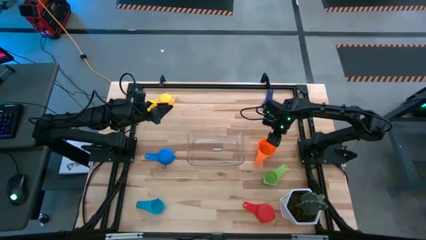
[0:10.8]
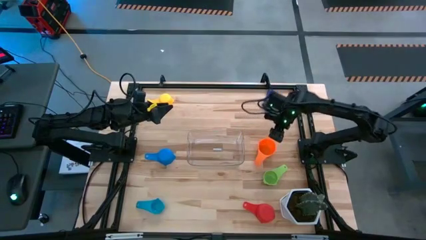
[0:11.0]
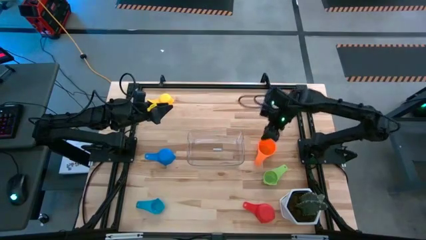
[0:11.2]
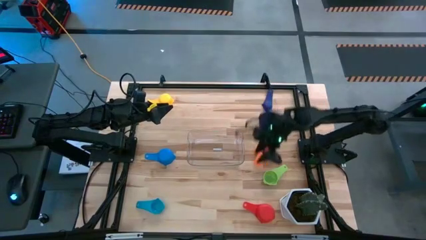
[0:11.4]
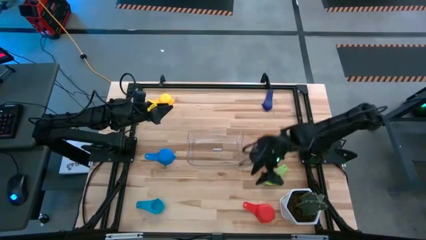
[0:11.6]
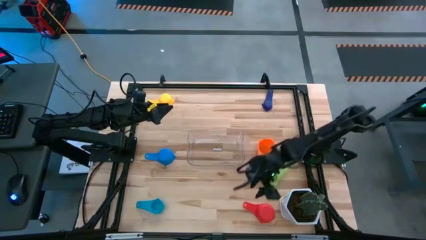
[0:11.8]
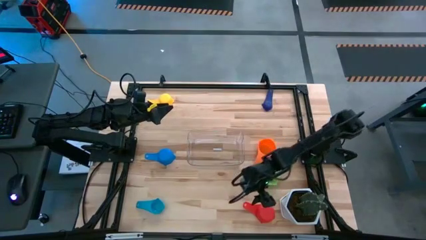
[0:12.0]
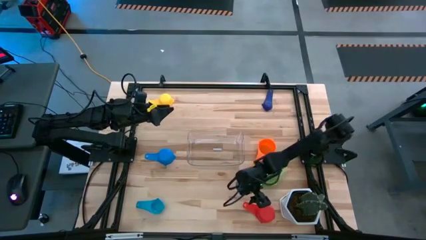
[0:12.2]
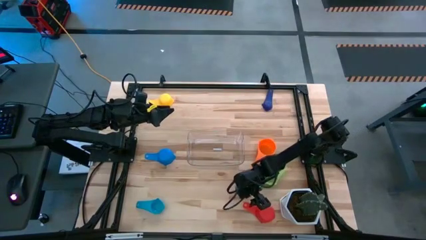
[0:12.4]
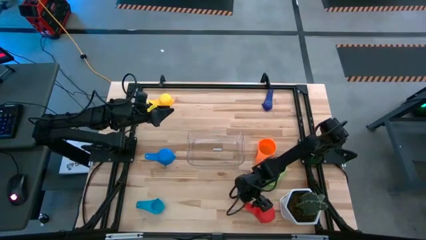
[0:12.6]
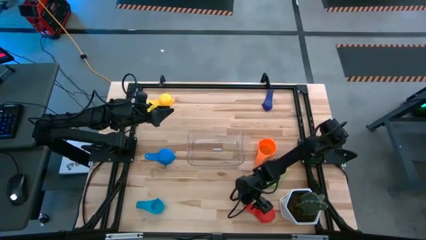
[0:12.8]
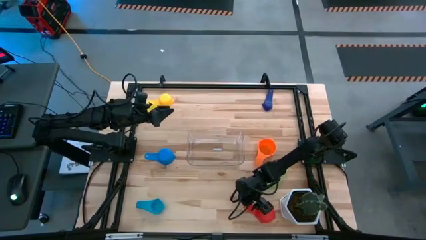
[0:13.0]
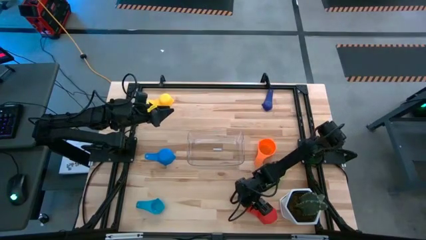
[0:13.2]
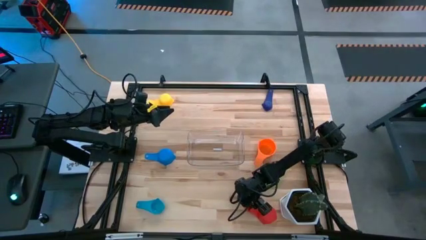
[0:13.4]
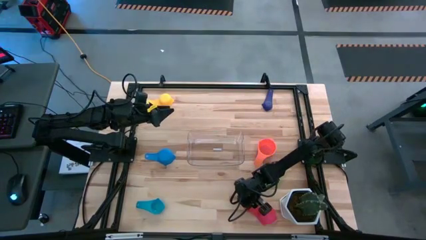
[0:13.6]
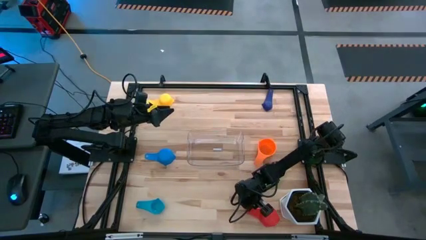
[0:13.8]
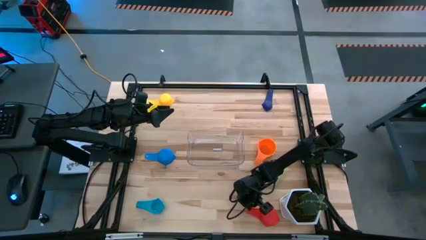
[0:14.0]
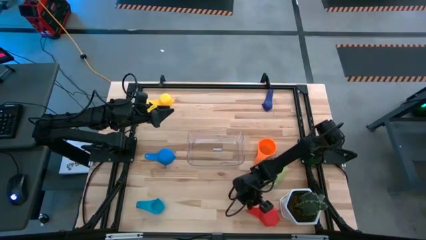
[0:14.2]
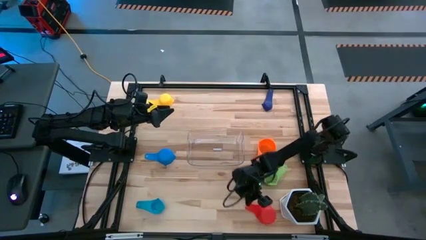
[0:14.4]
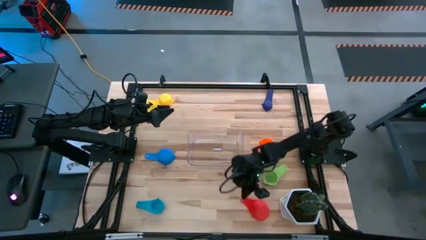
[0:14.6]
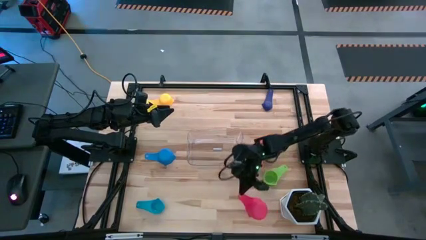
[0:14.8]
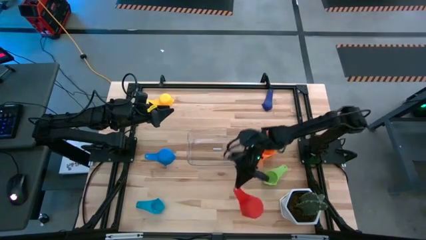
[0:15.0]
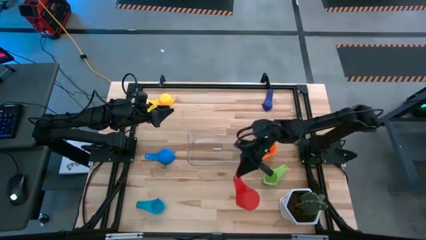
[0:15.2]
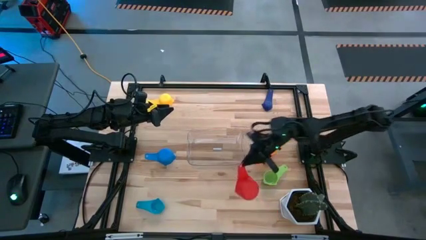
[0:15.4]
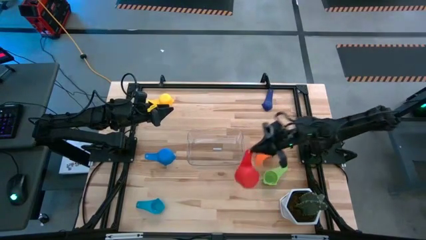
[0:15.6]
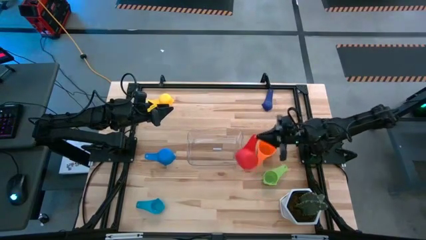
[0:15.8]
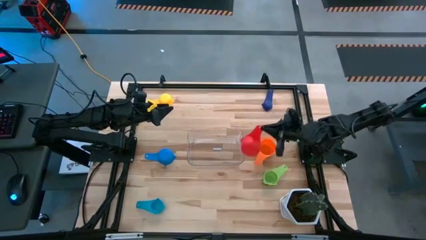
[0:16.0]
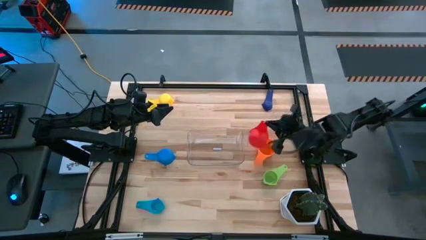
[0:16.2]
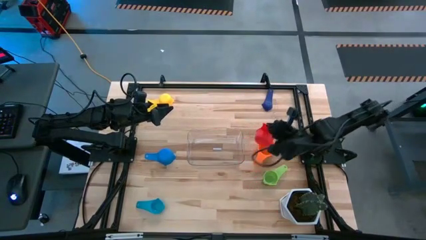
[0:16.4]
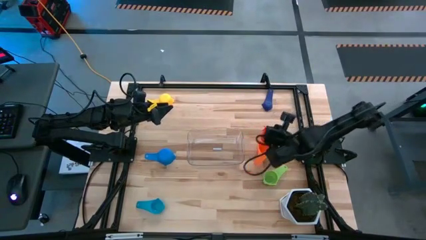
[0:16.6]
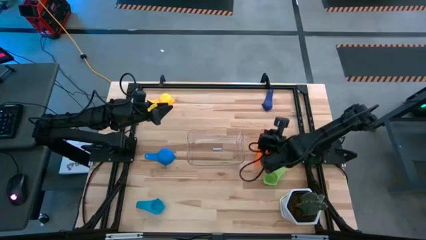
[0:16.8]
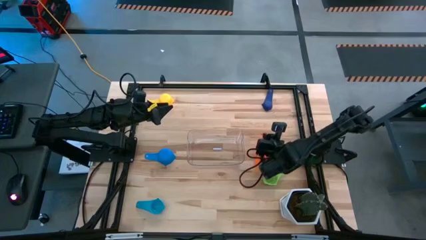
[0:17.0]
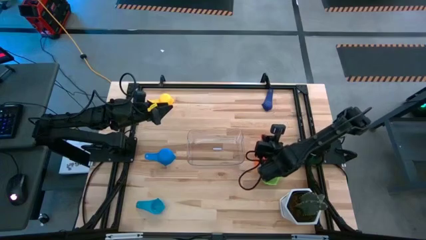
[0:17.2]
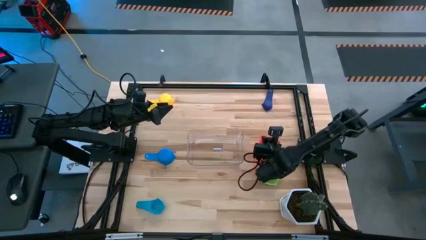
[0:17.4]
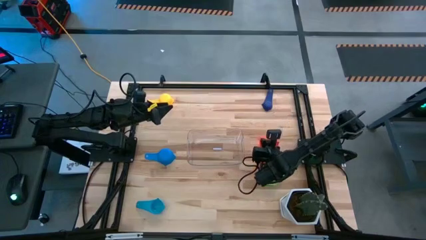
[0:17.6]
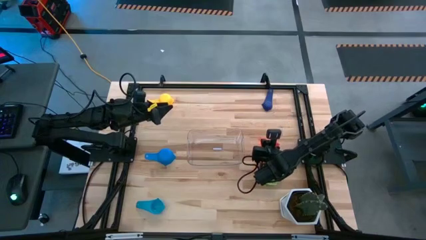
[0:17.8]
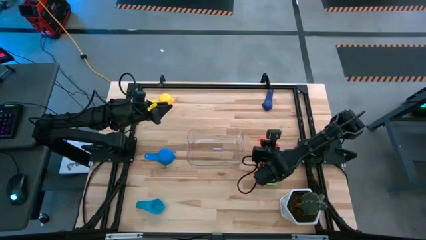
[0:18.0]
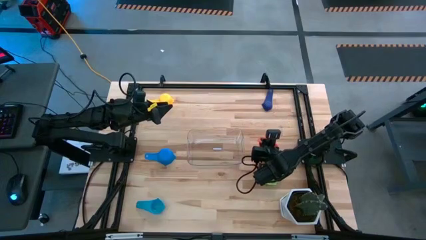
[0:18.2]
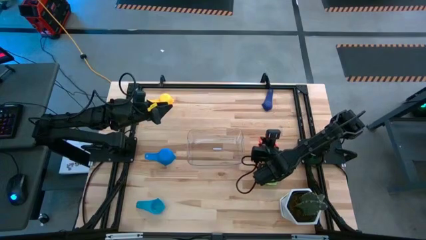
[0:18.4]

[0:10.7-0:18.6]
Task: Nest measuring cups in basket
Stack the red measuring cup on top of the orange measuring cup

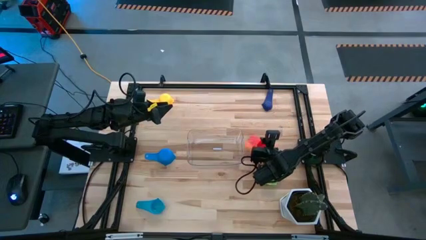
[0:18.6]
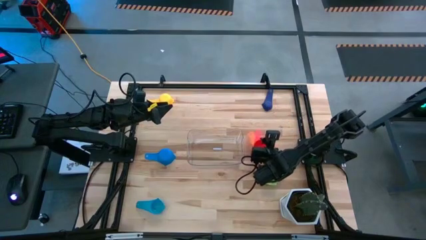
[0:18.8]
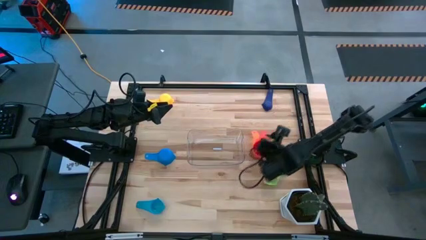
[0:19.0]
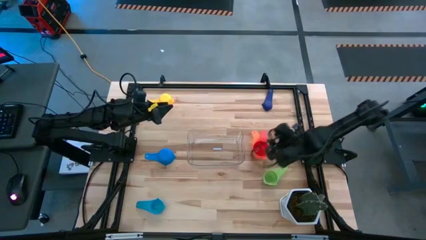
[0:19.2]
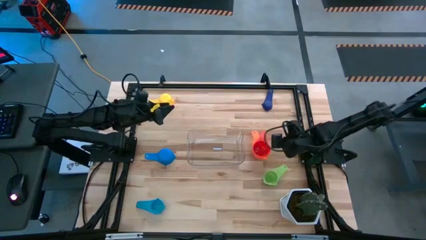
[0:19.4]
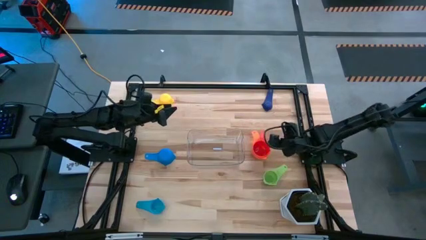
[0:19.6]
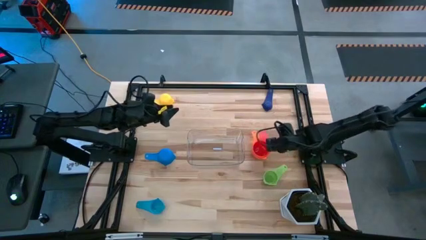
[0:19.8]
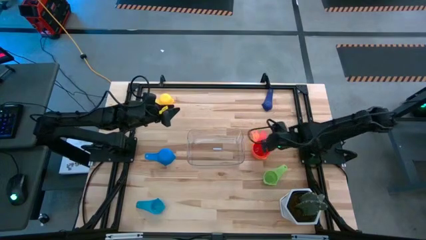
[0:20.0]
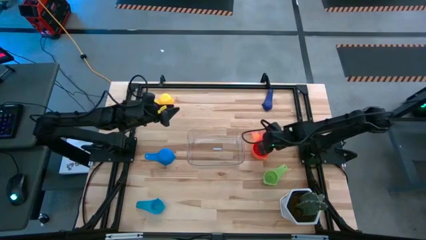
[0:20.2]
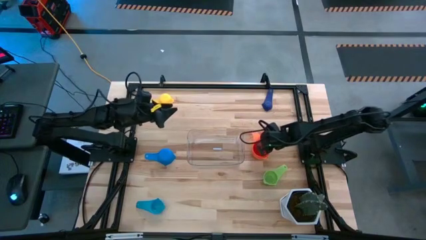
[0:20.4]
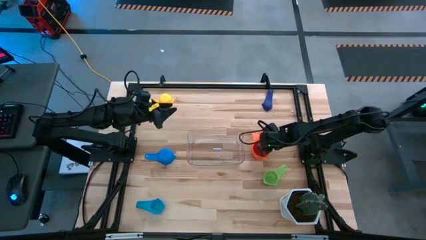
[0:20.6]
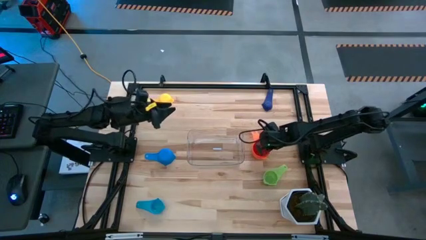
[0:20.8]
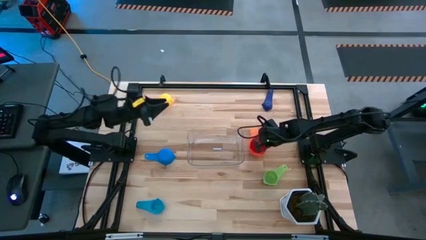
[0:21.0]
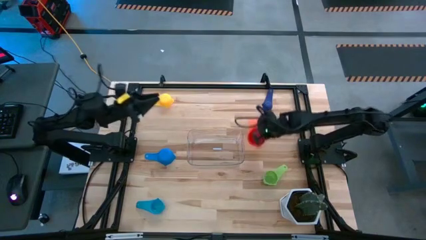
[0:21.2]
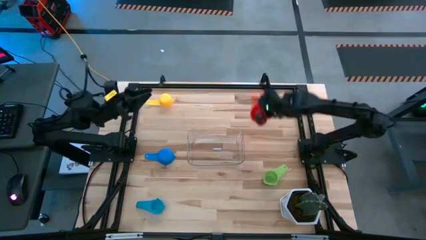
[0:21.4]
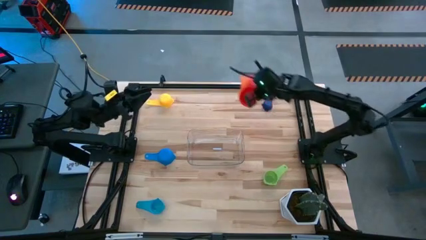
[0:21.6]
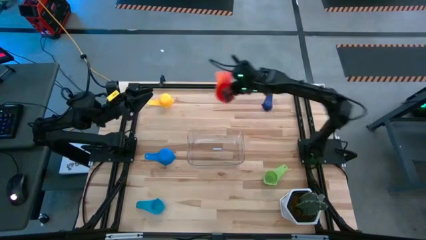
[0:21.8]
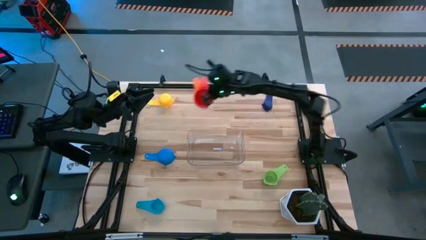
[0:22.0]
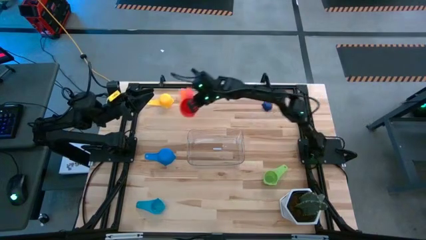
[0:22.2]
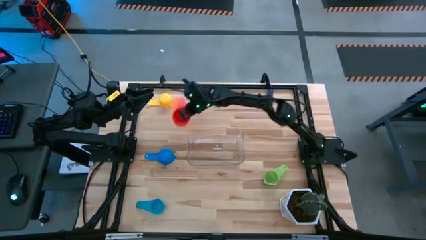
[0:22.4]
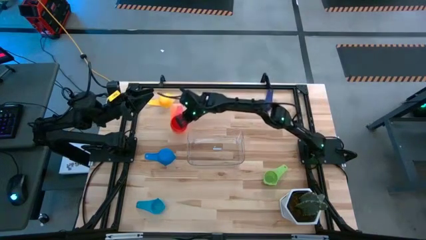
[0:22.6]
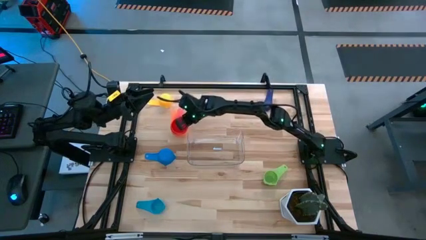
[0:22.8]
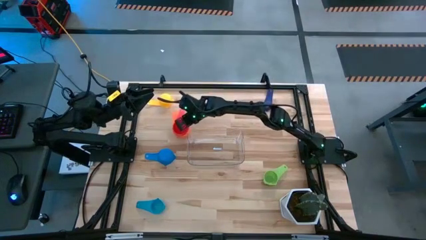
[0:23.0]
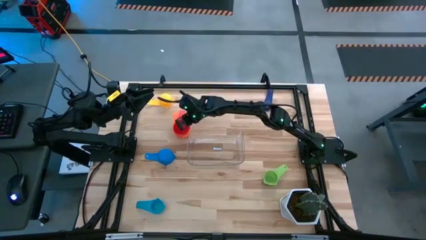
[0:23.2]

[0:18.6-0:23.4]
Move the stacked measuring cups to the top left of the table

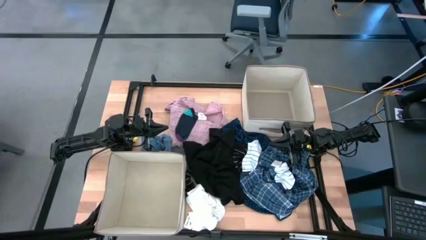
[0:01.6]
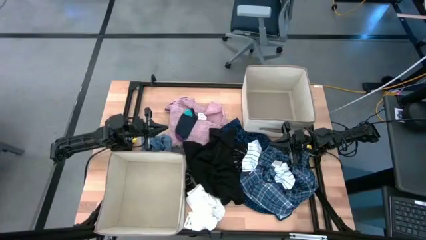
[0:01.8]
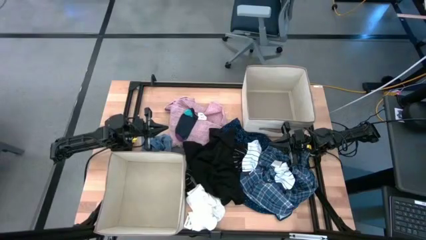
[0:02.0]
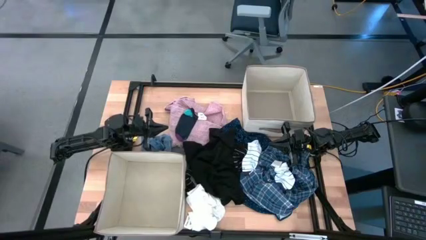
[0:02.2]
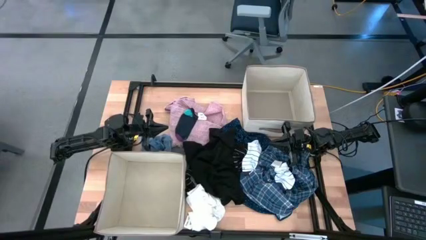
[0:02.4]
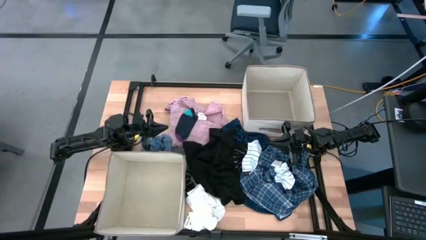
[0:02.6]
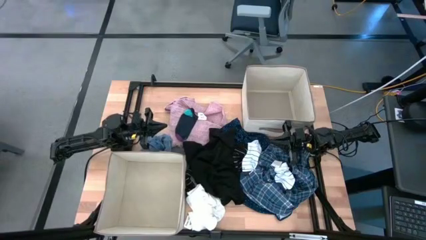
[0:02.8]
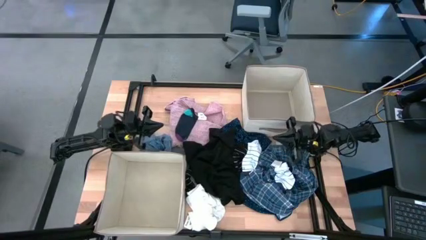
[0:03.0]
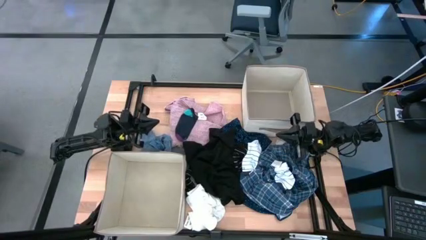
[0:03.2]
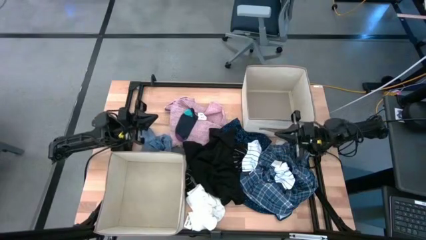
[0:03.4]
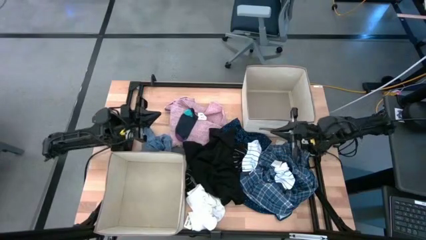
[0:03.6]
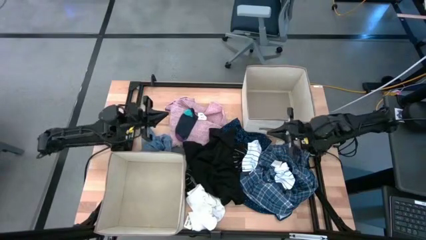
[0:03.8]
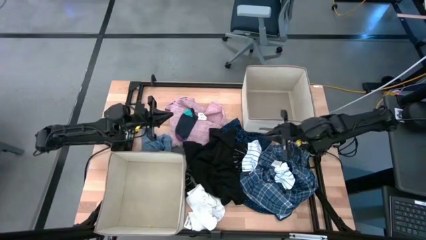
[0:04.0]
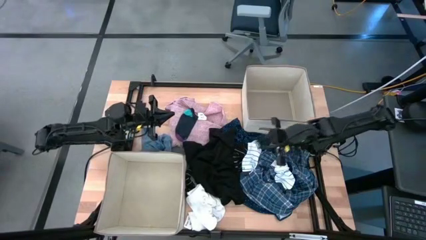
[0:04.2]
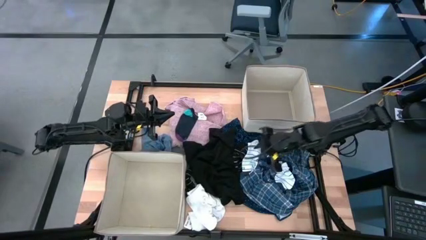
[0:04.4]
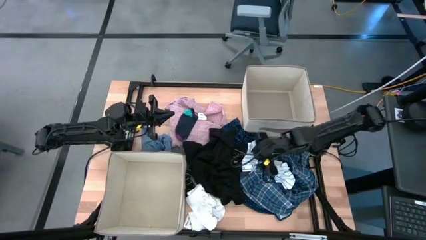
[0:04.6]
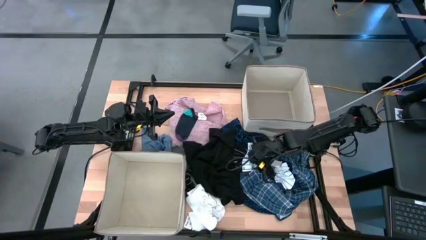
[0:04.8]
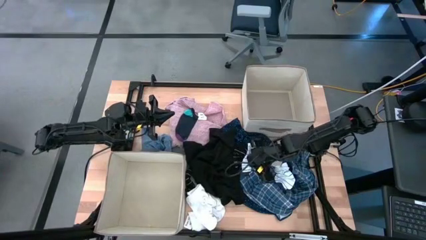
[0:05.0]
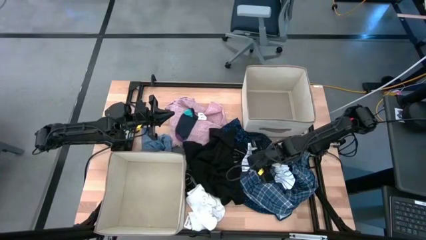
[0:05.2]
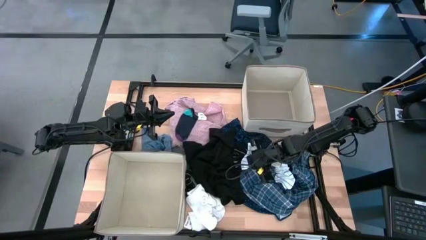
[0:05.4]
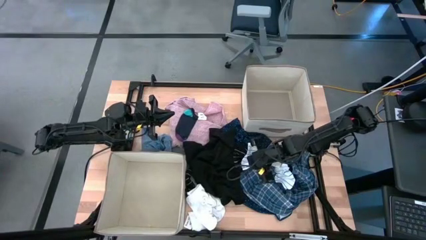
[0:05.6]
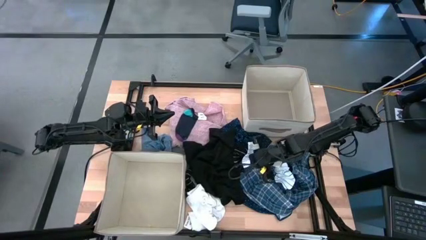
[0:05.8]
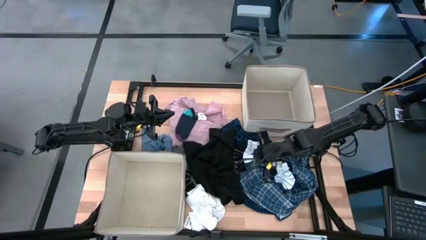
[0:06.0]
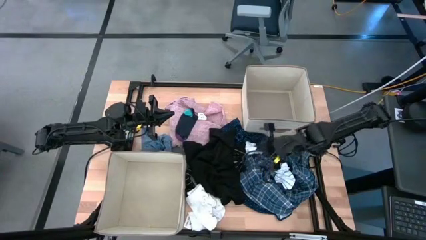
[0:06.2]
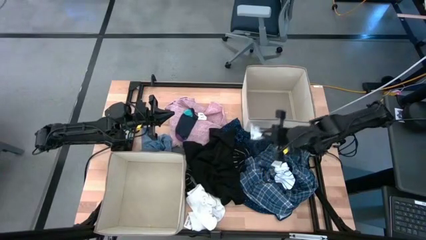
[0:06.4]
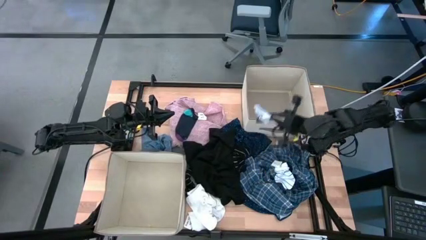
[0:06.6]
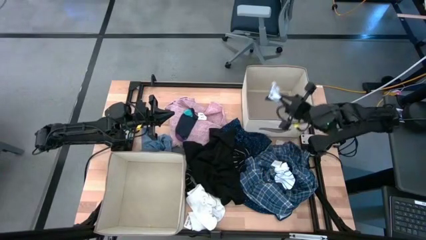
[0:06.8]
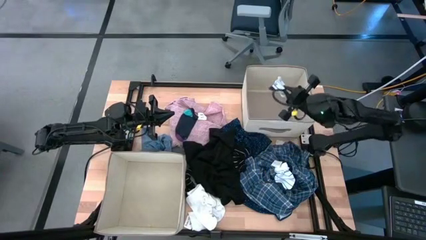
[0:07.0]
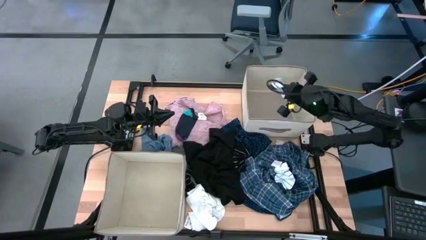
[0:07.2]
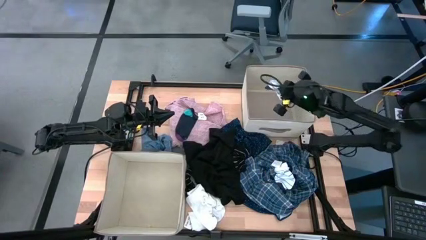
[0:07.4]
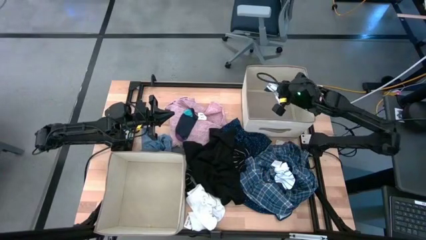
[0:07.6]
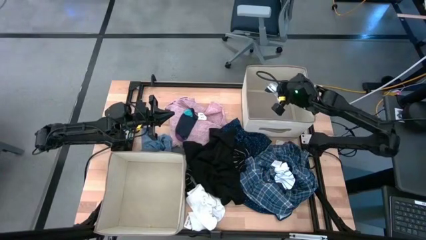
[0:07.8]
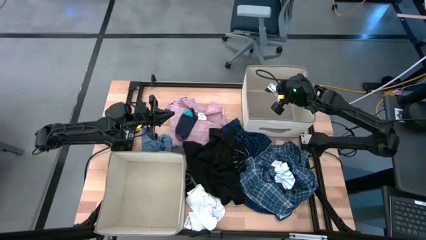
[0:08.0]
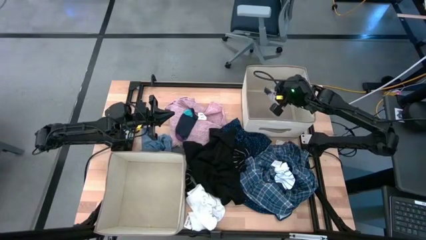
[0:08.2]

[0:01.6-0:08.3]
Task: Sort clothes
Put the white striped sock into the top white laundry organizer
